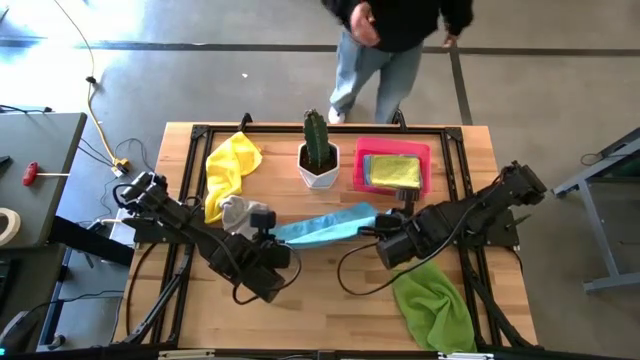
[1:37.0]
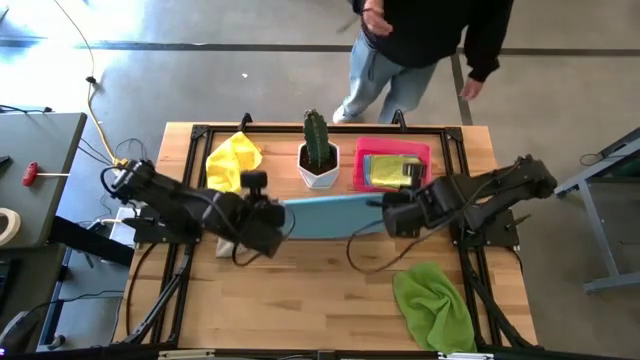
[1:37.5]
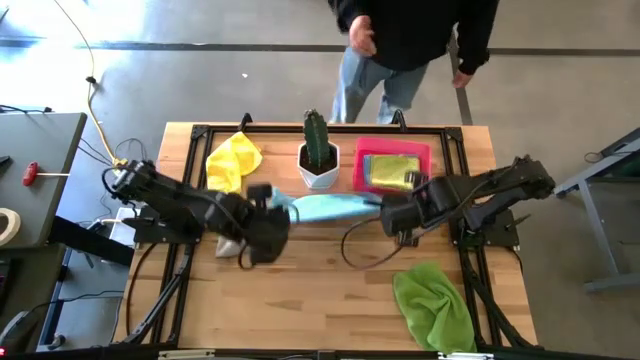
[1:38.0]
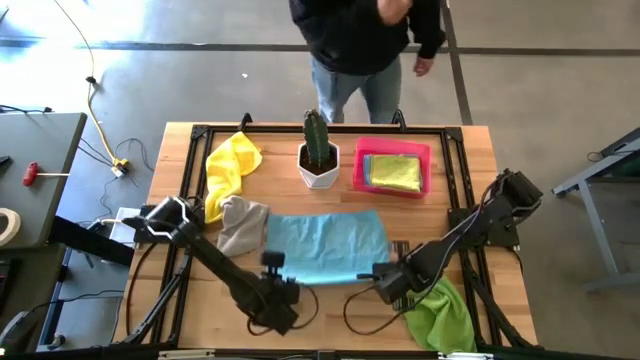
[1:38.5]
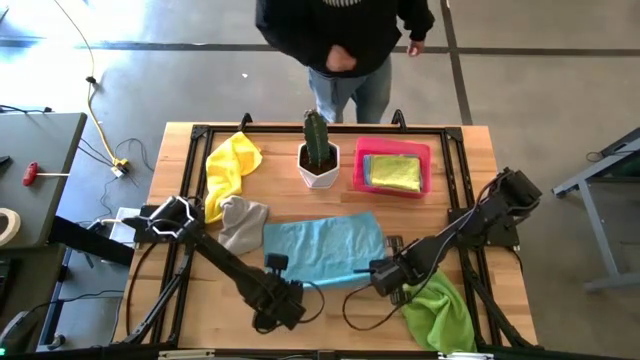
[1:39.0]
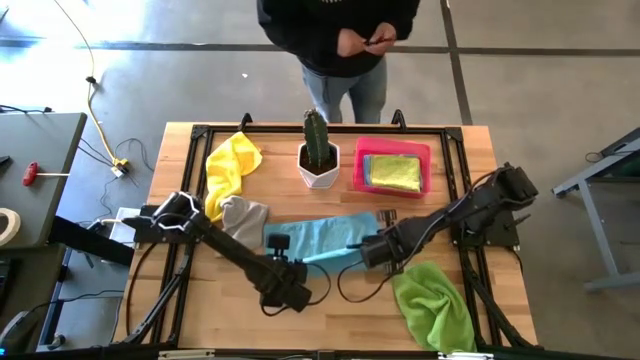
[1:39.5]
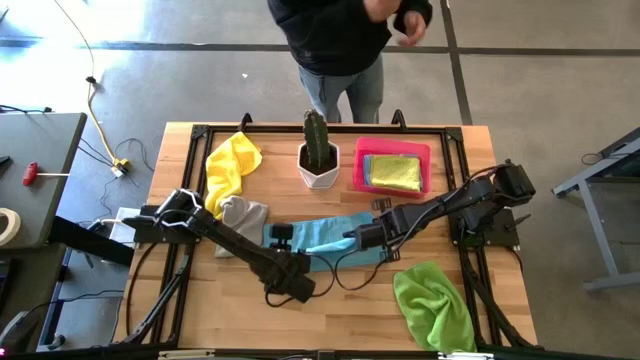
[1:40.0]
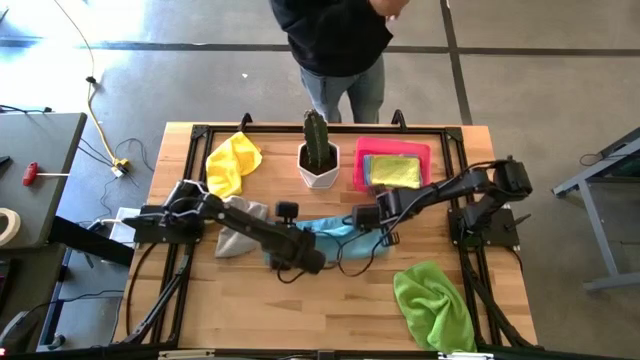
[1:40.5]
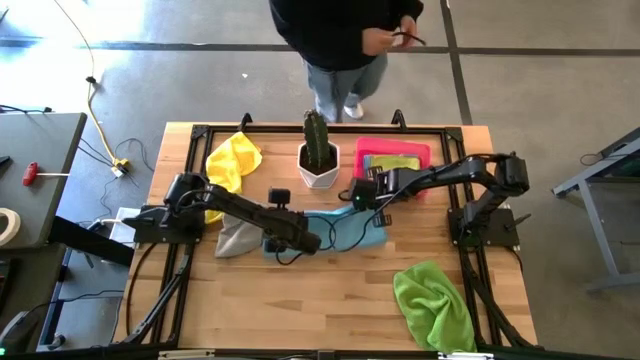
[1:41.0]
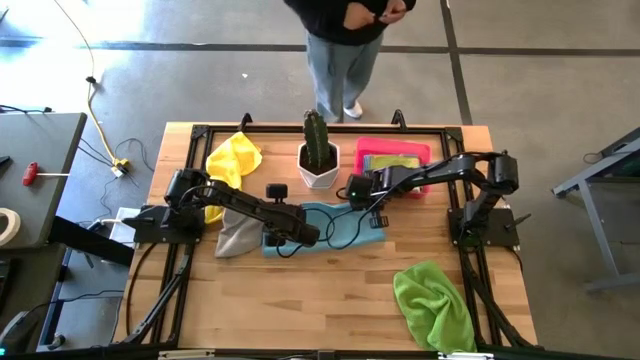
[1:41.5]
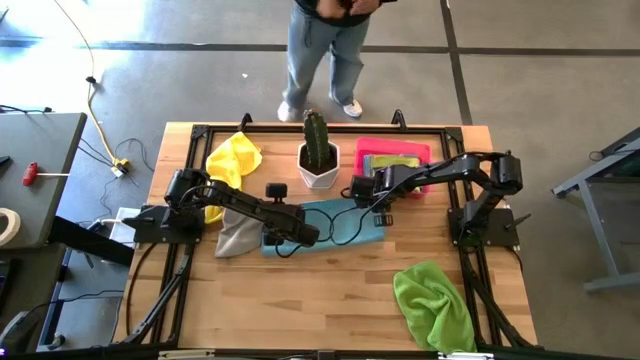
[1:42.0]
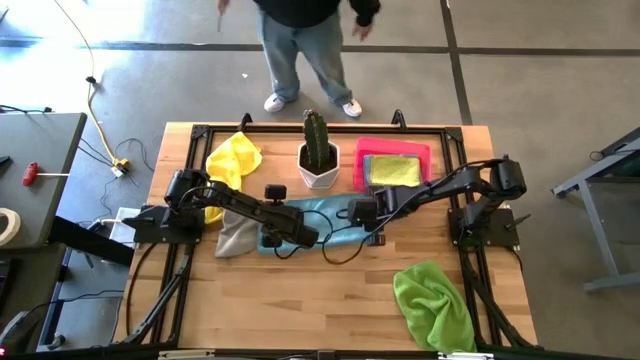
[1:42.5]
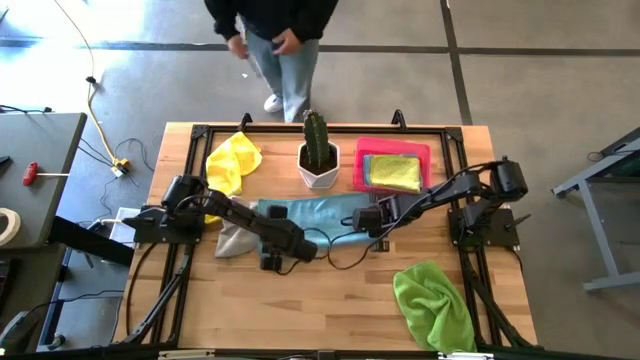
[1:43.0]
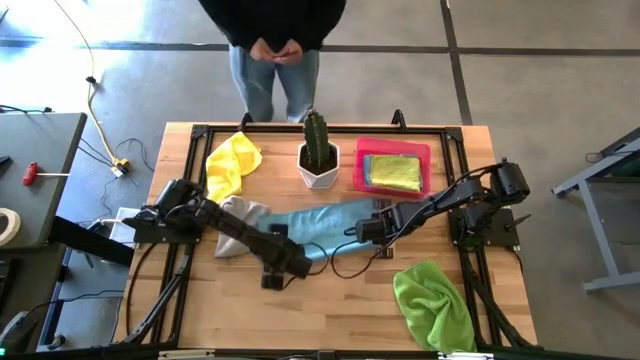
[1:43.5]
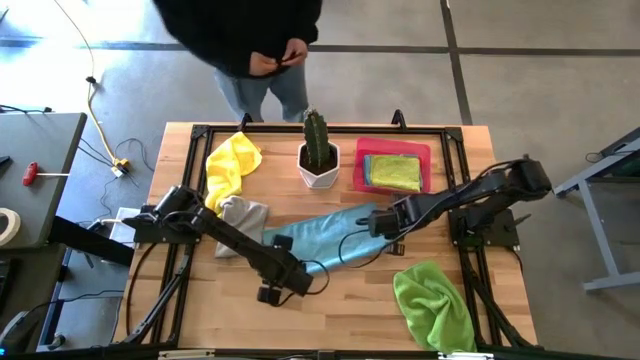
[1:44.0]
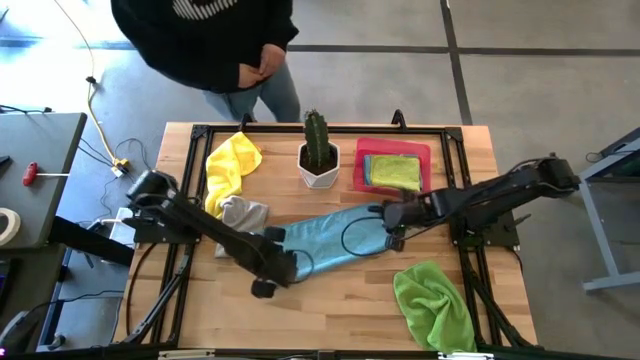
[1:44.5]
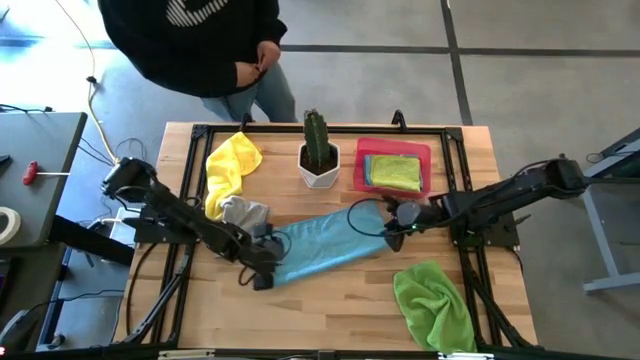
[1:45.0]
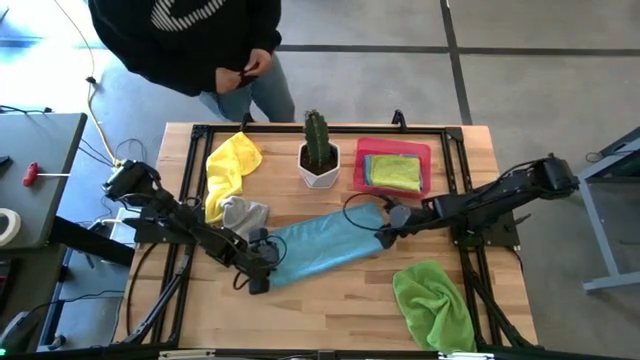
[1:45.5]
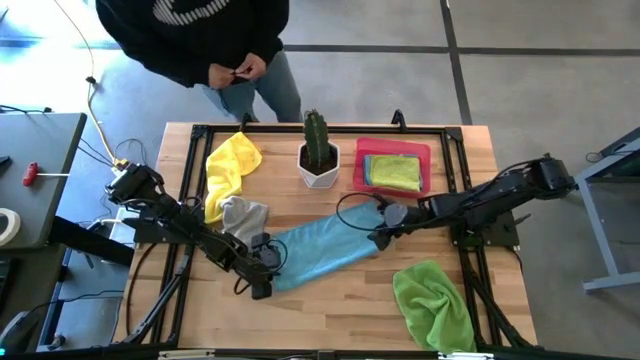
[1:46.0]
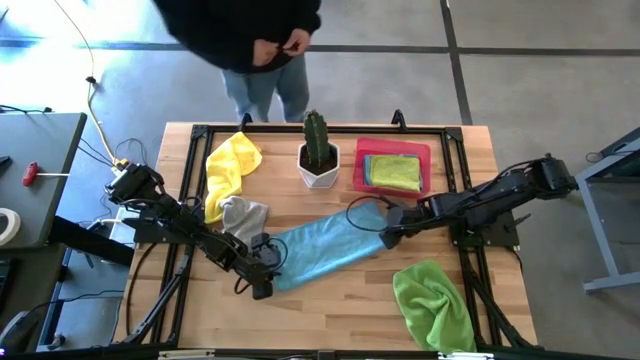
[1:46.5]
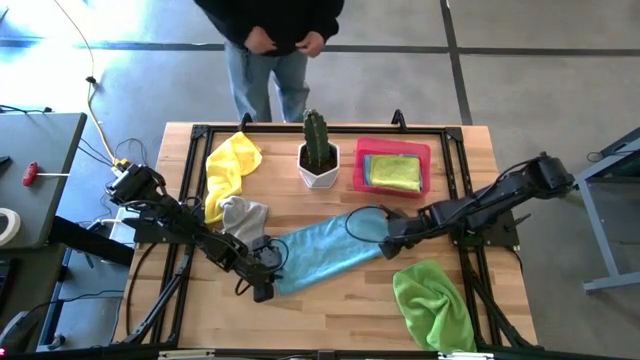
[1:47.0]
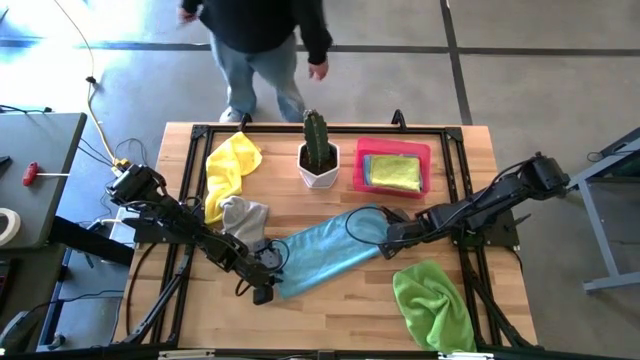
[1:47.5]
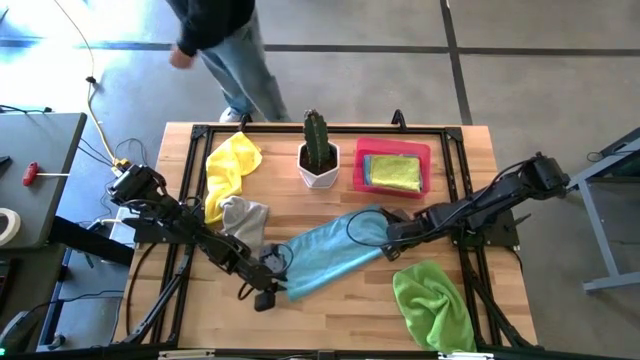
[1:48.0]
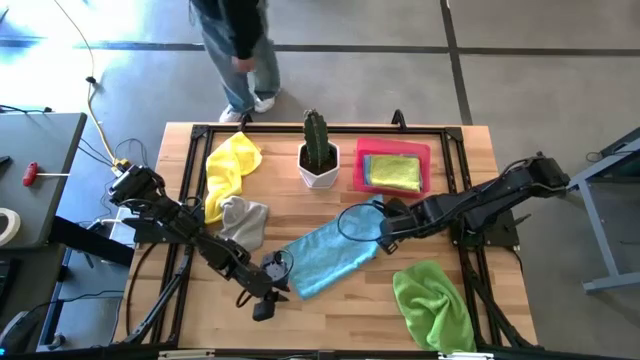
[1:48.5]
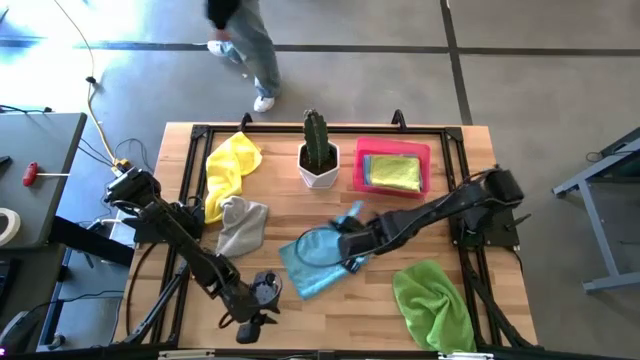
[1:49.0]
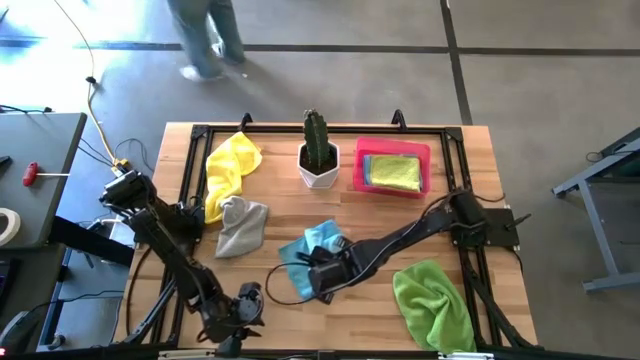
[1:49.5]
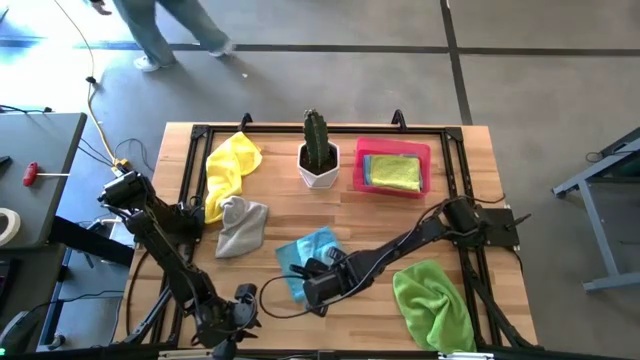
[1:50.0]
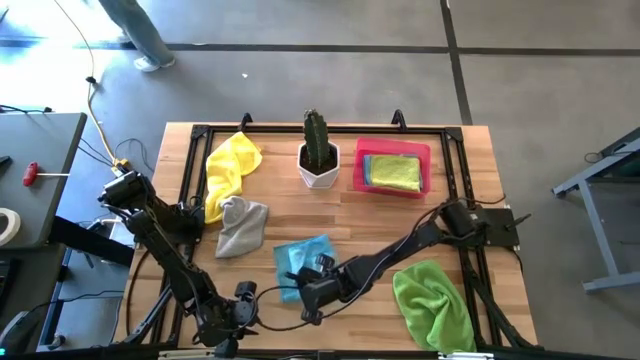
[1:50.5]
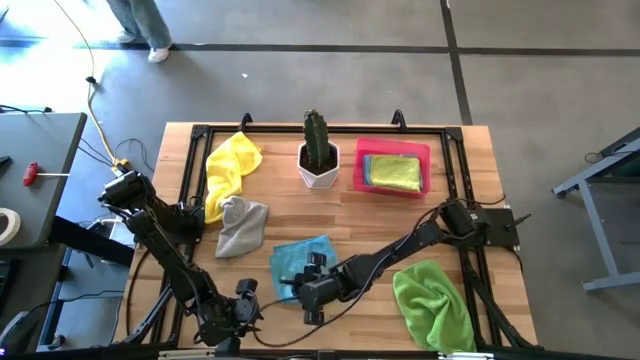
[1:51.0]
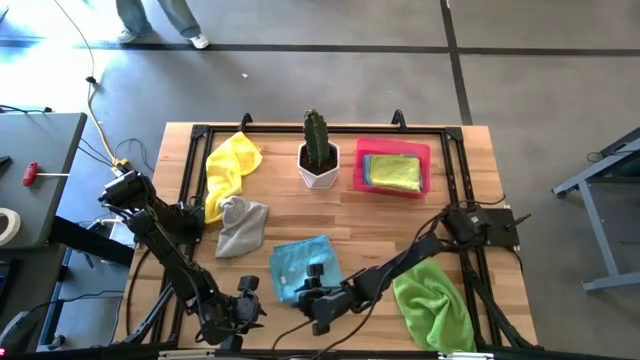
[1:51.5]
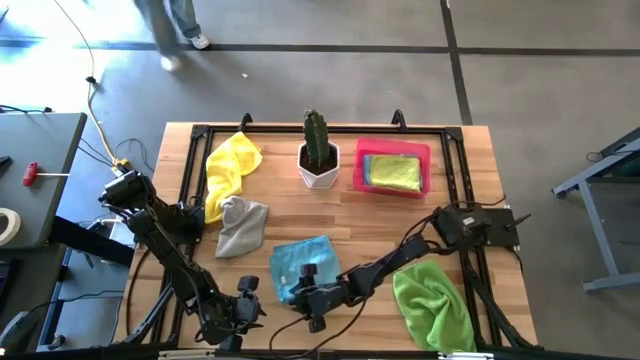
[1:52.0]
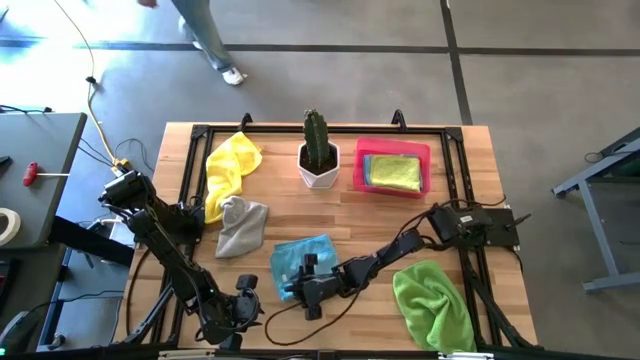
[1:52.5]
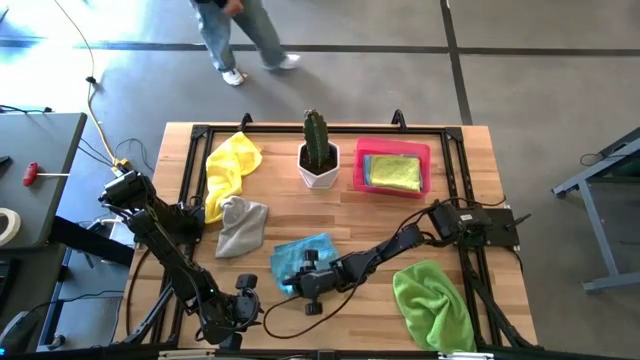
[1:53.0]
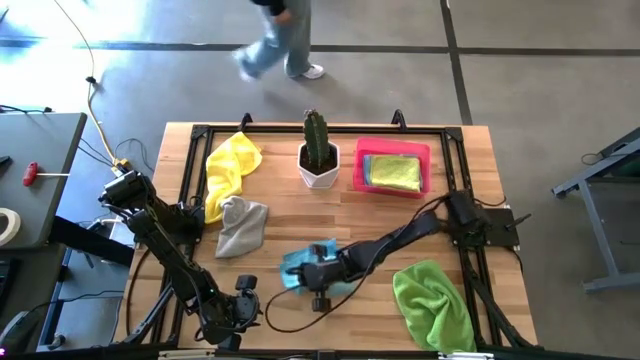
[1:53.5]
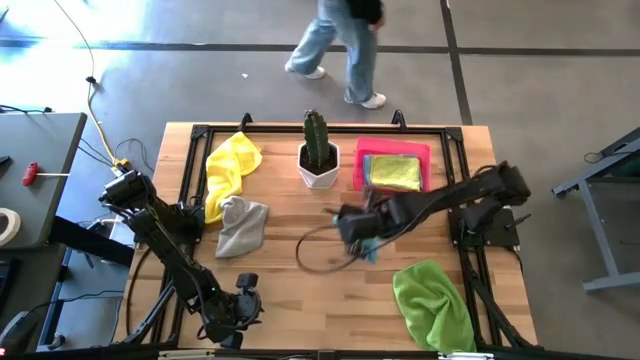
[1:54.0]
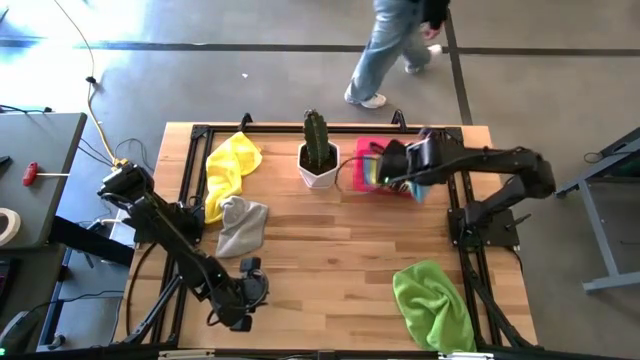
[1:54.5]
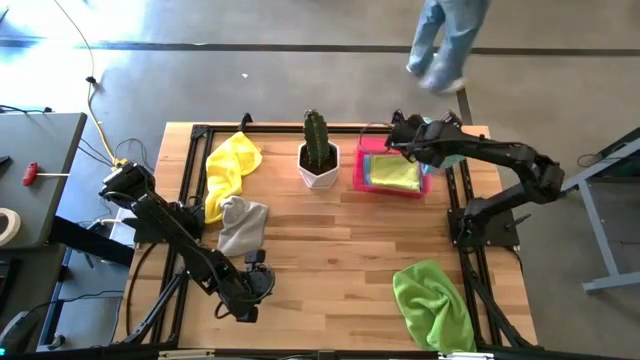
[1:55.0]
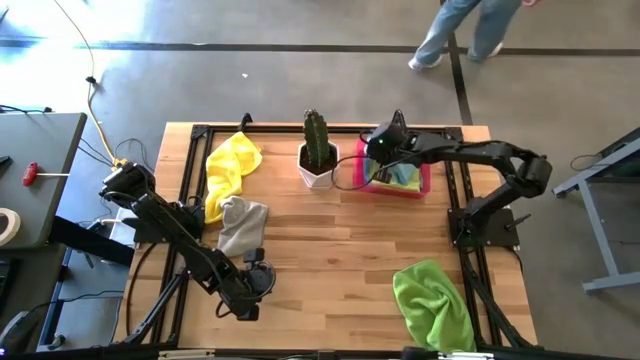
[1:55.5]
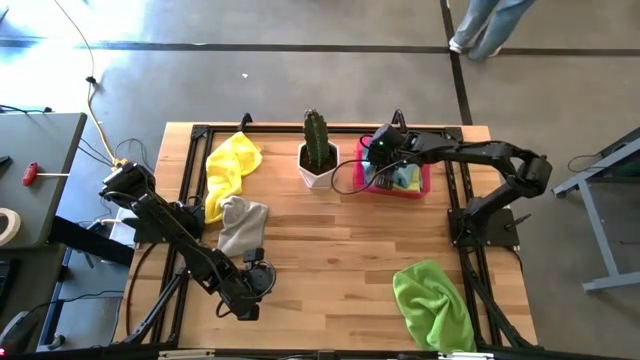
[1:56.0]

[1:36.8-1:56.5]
Task: Fold microfiber towels
Put the blue towel into the pink laundry bin

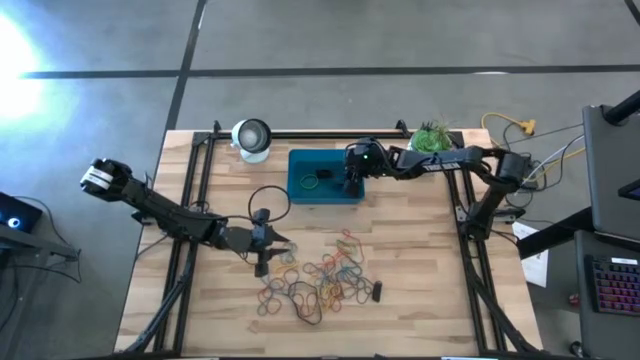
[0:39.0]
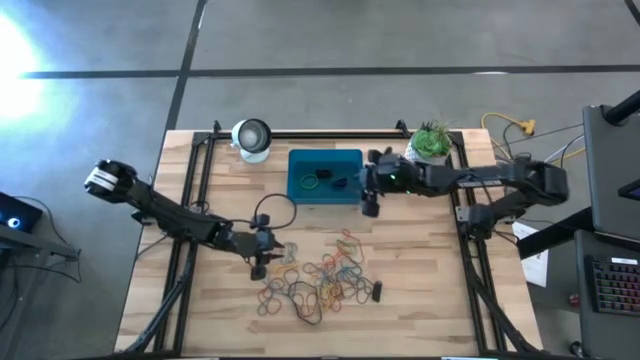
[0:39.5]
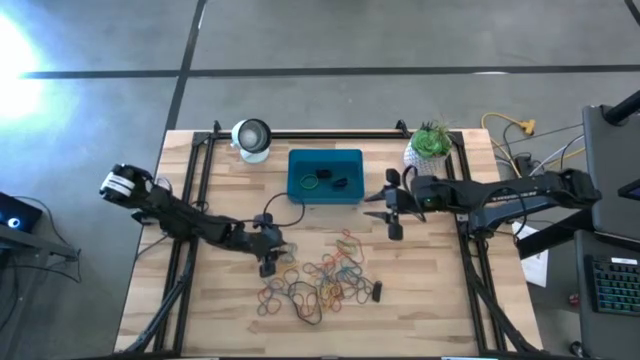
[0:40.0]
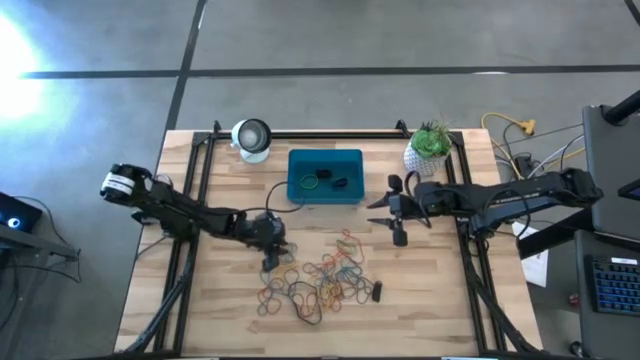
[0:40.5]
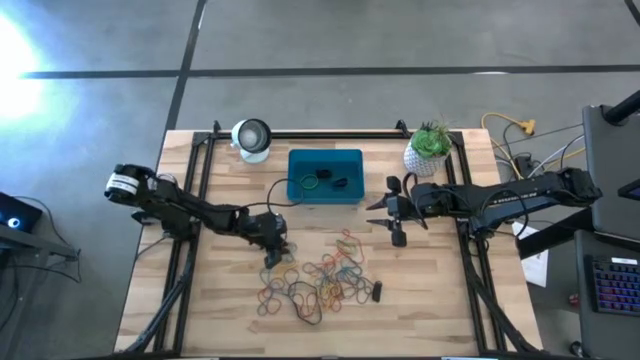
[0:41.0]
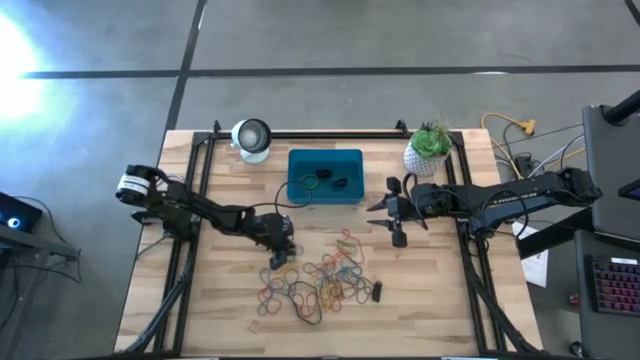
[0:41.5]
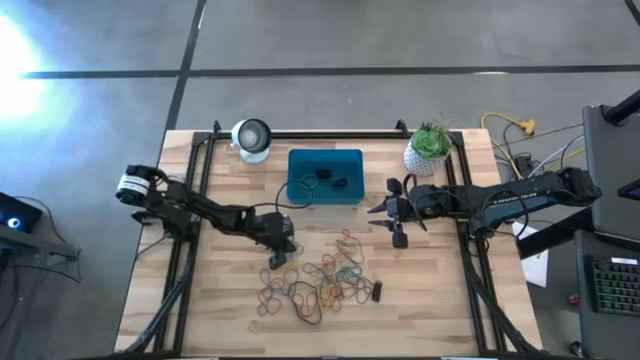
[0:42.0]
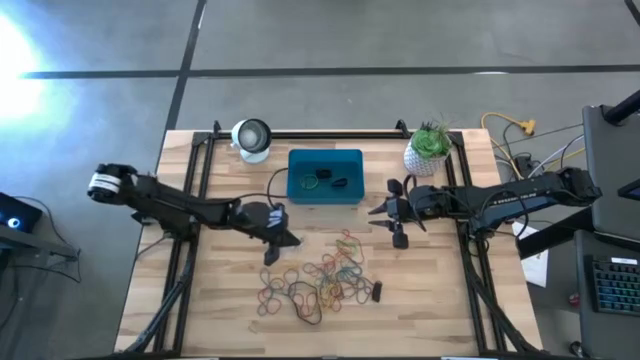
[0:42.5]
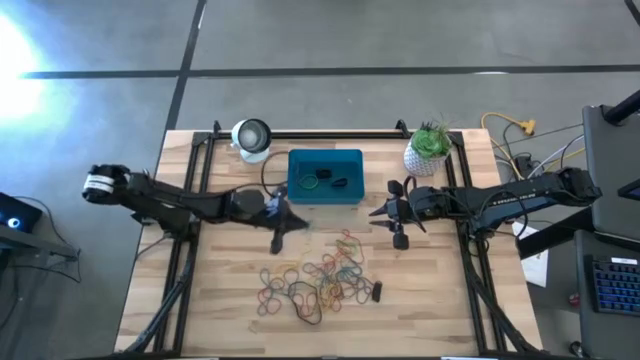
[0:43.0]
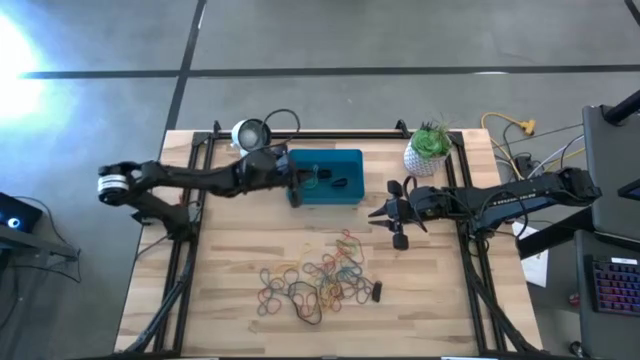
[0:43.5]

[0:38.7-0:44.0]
Task: Pick and place rubber bands into bin
Put the blue rubber band into the bin
